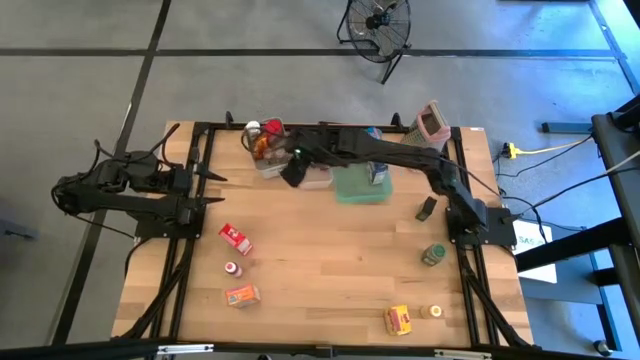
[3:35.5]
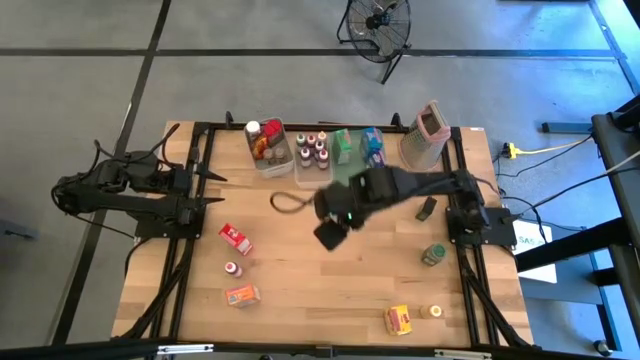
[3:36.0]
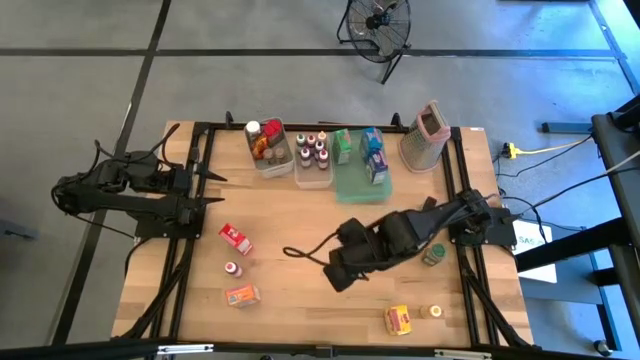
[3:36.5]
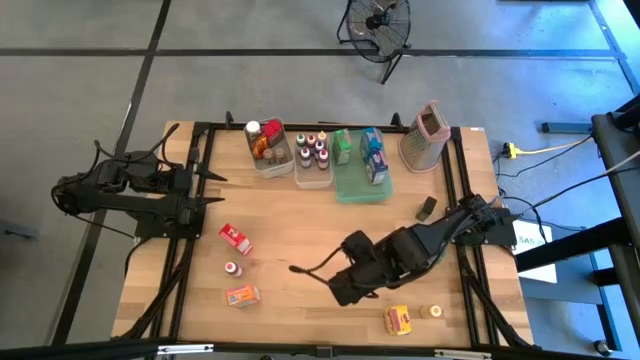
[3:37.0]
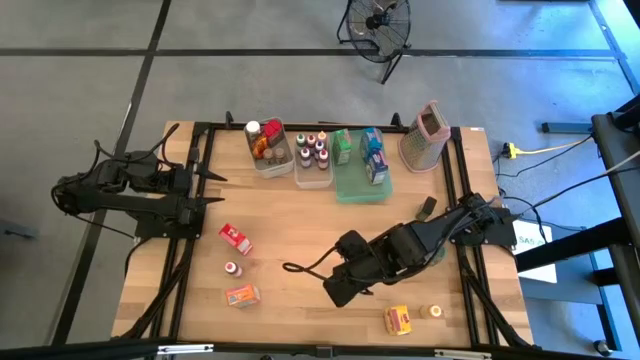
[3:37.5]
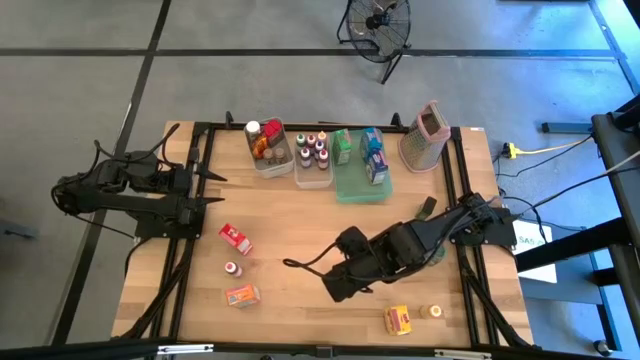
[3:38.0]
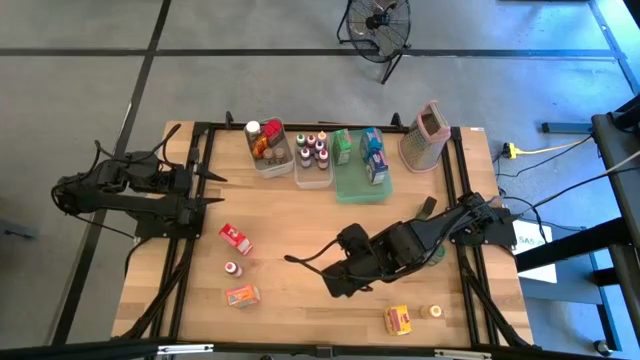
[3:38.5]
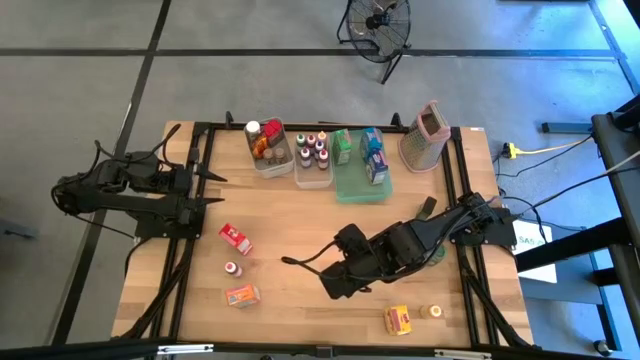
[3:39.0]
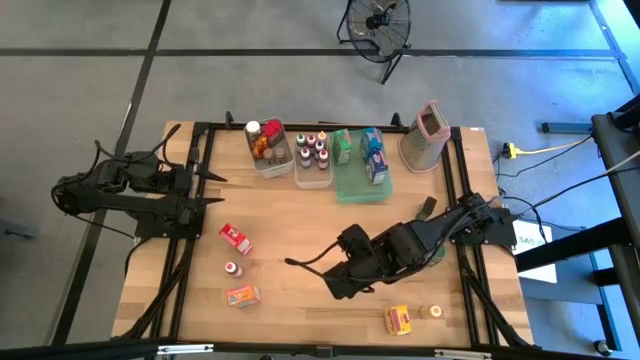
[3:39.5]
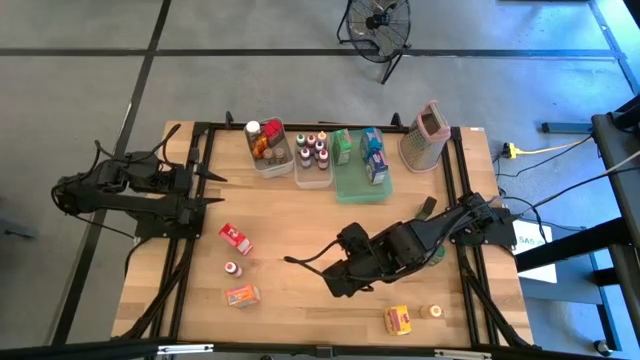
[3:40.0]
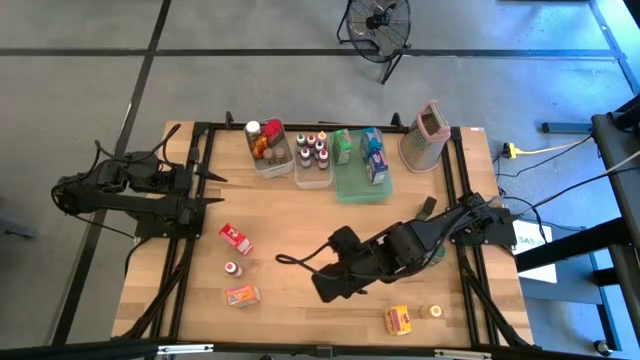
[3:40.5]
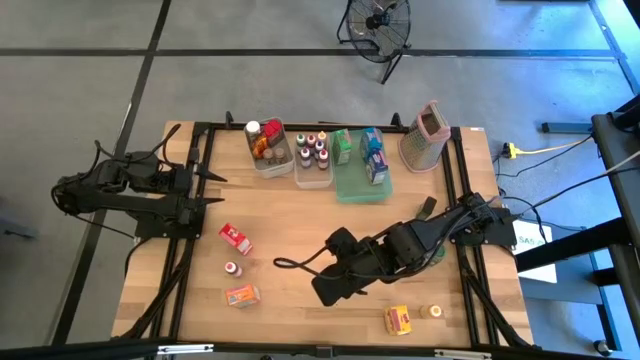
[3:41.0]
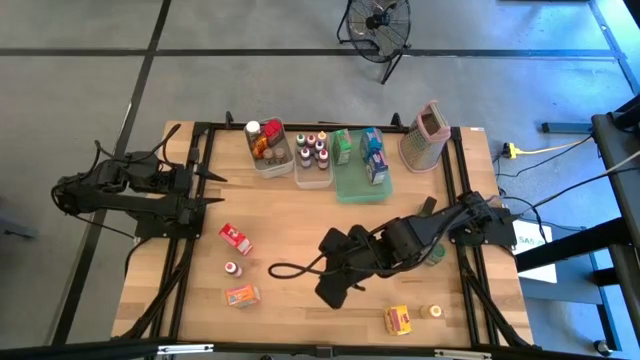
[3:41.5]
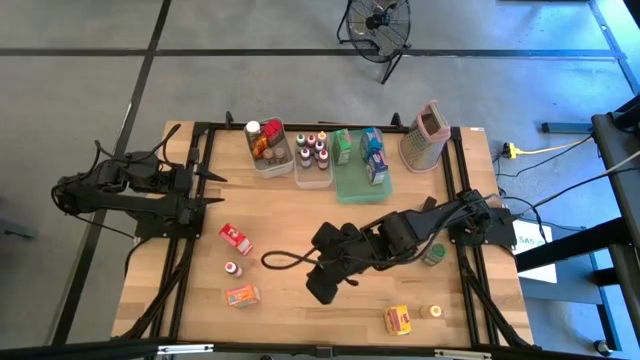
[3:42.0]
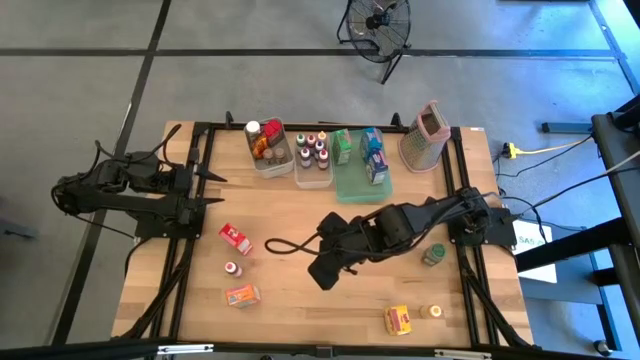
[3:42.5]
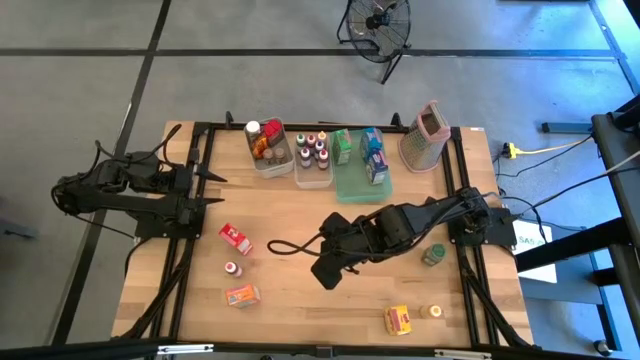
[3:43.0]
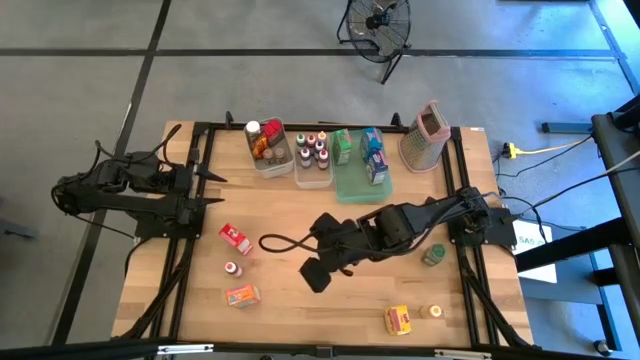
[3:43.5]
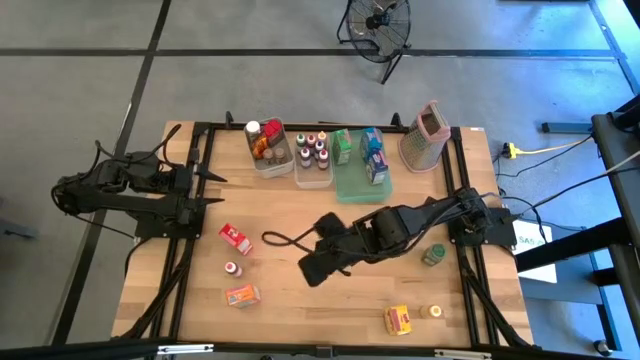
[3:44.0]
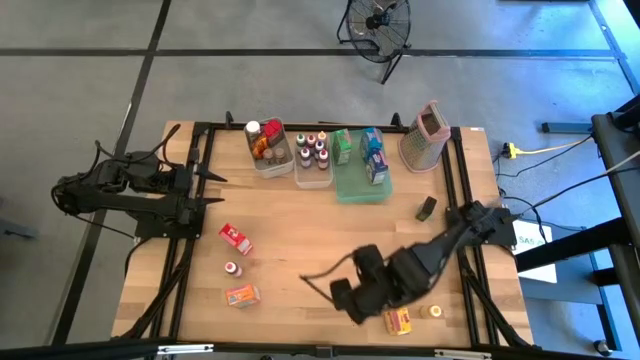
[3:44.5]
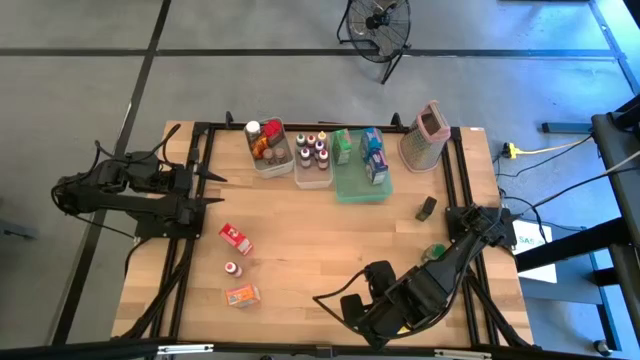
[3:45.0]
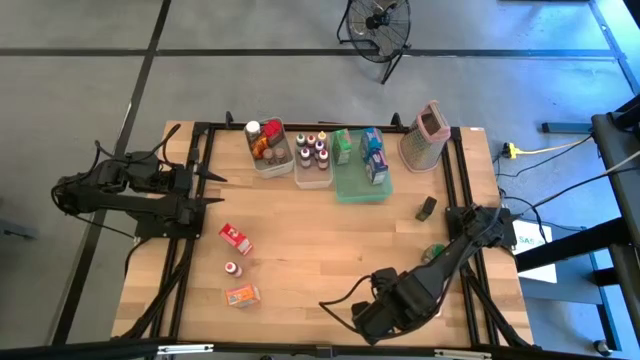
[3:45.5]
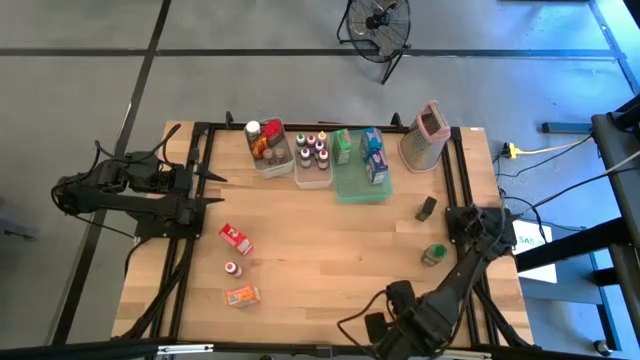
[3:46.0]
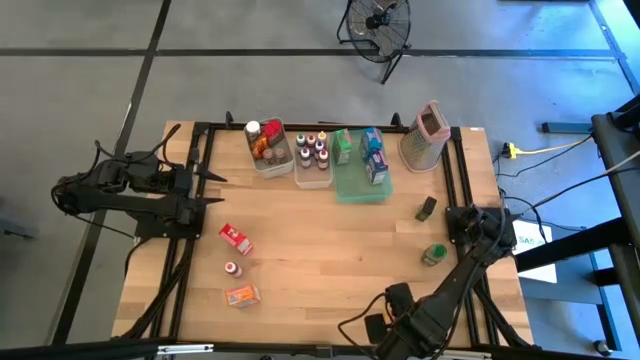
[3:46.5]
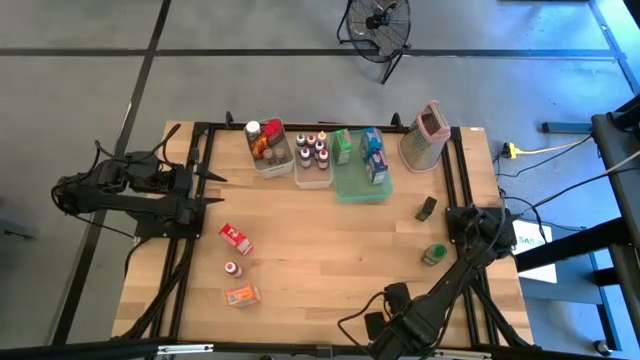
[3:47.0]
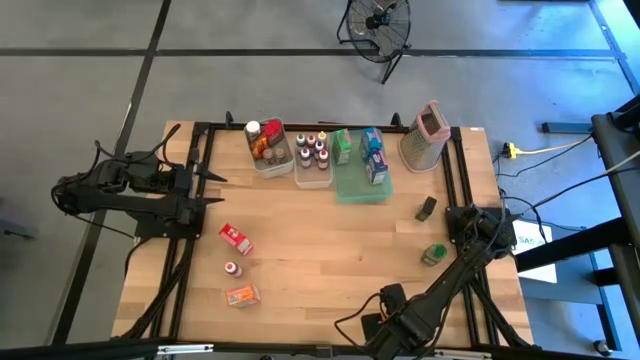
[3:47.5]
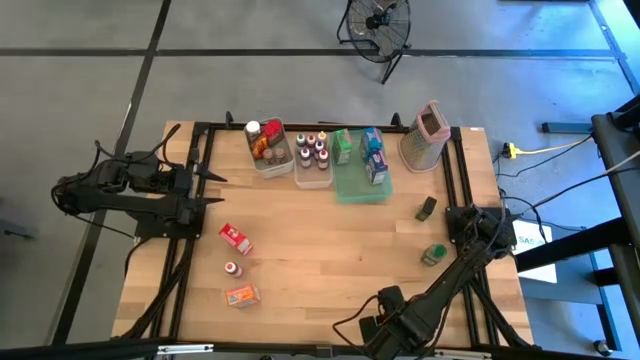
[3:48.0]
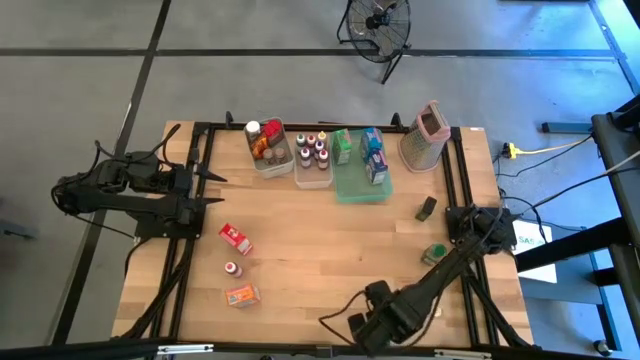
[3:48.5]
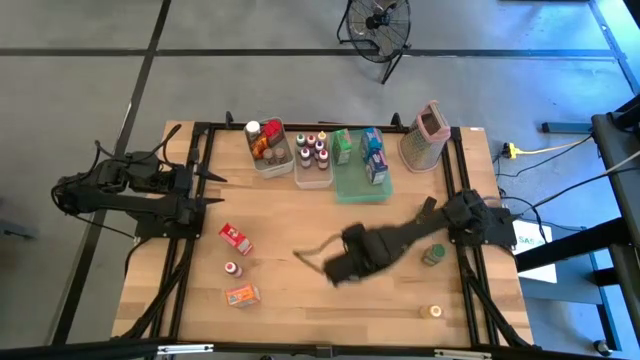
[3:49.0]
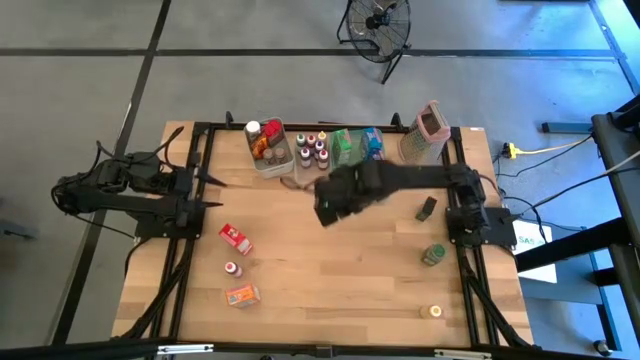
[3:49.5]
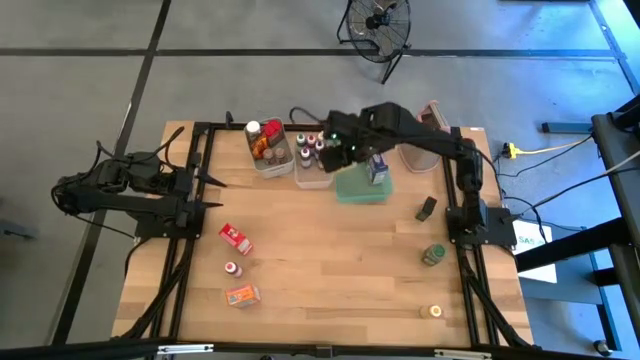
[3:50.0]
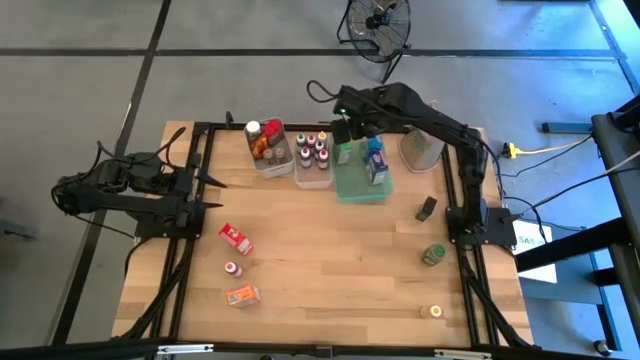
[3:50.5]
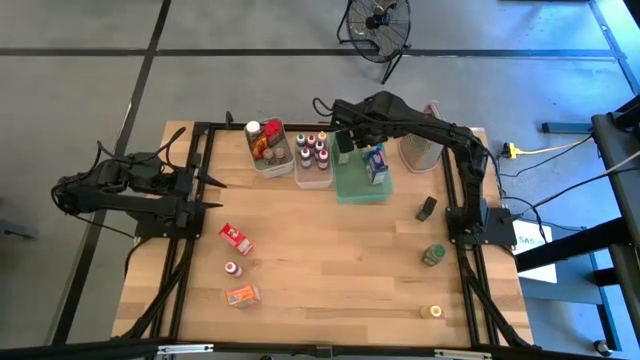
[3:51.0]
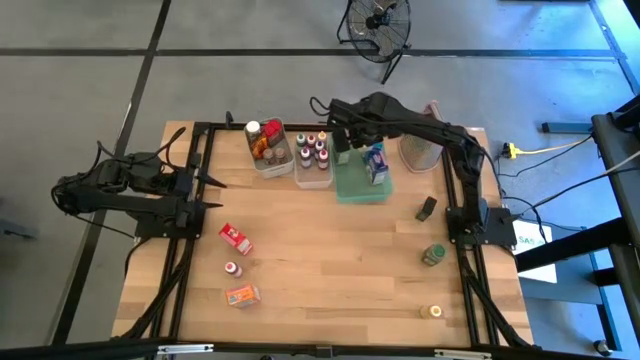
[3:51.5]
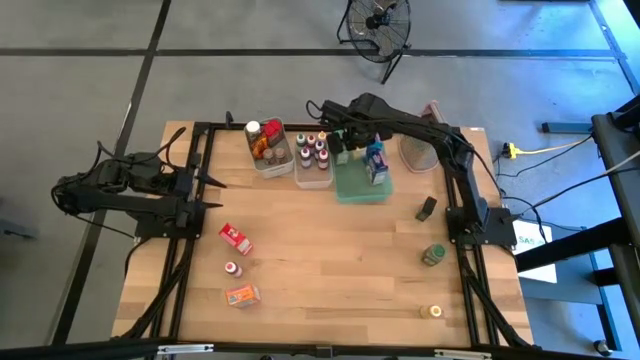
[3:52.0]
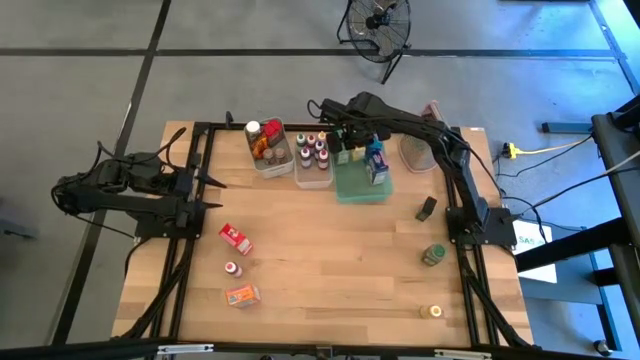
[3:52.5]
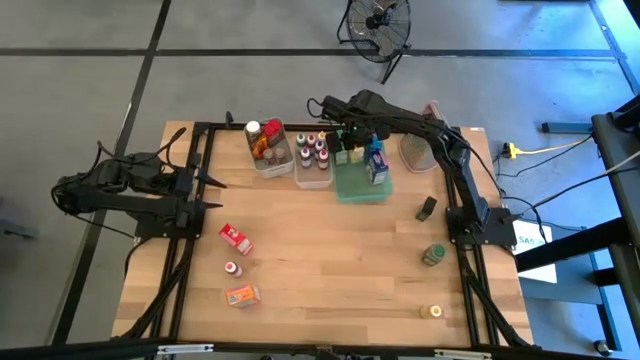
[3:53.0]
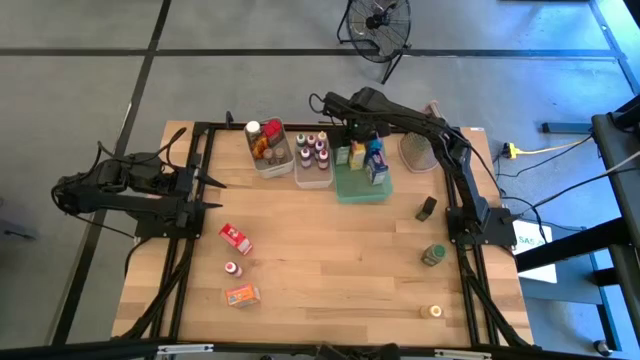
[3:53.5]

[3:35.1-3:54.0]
Task: Pick & Place Kitchen Items
Put the yellow cereal box into the green bin

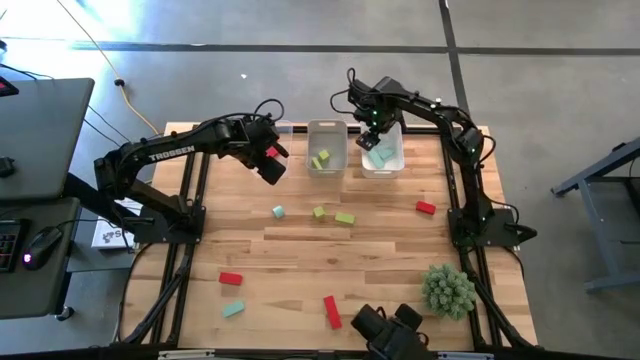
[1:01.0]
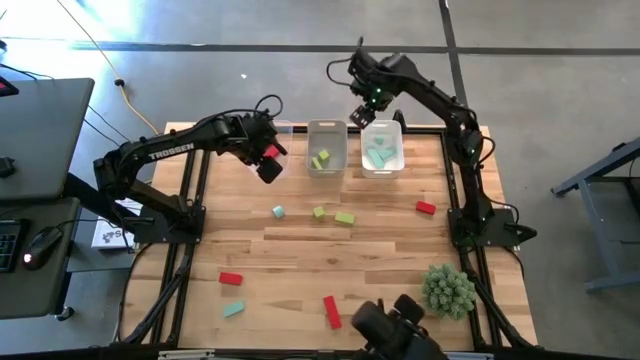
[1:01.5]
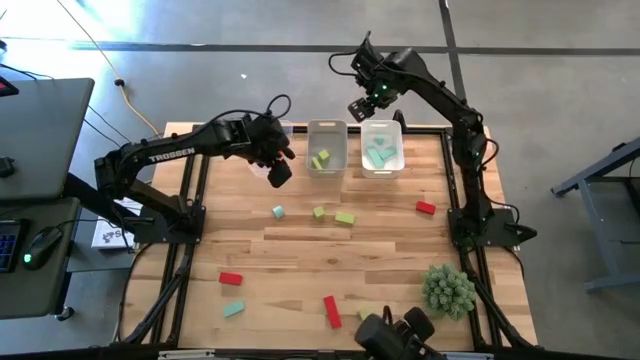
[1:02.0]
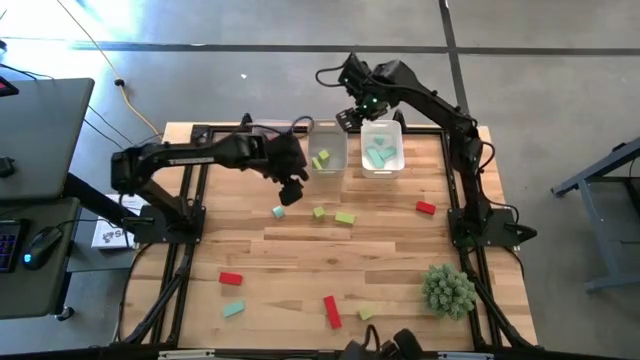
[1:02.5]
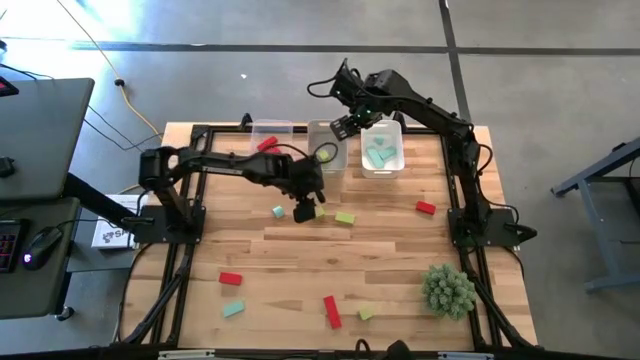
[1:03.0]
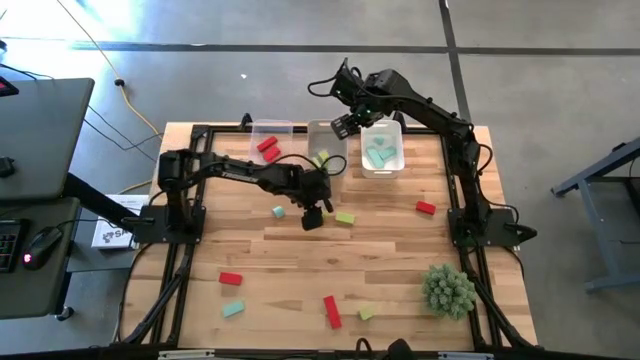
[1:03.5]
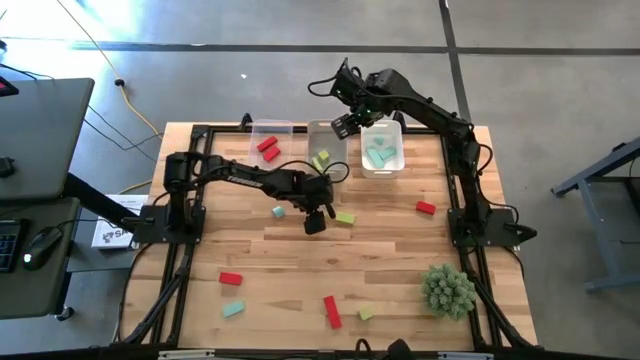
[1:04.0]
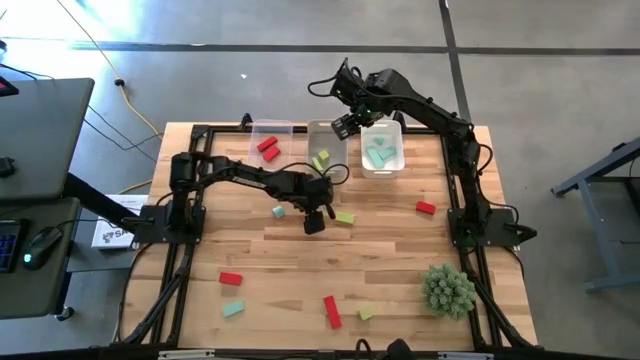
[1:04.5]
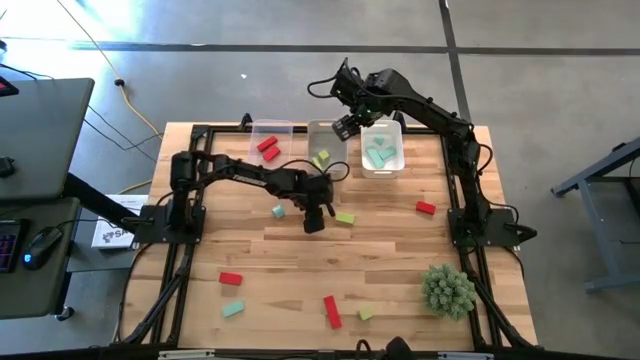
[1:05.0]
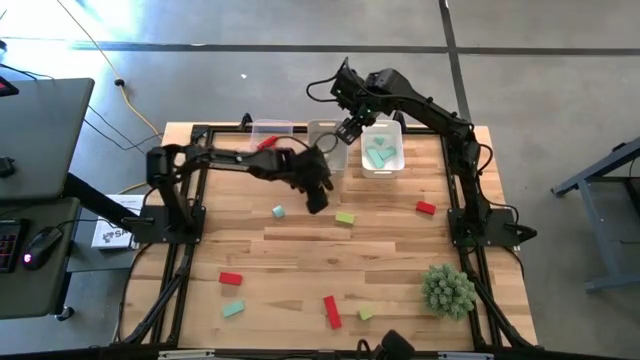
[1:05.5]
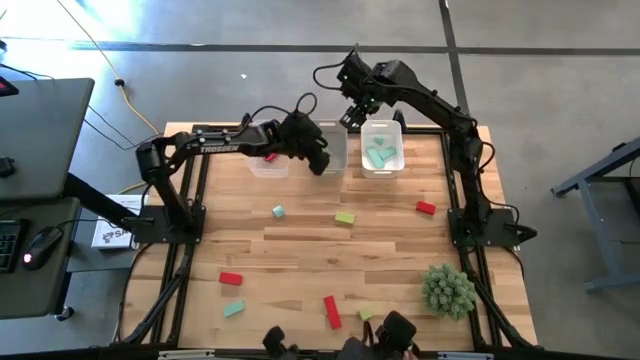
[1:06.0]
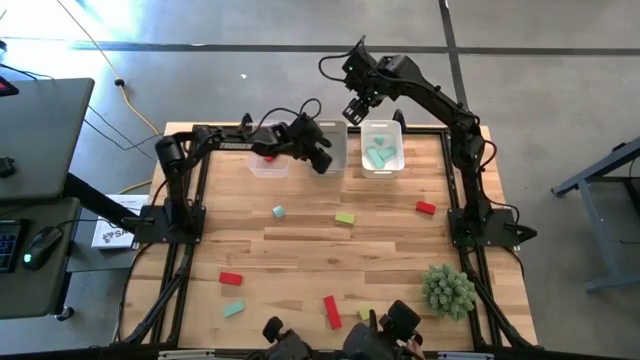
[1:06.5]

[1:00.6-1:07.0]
Task: Sort & place blocks by color
Put the green block into the gray bin
